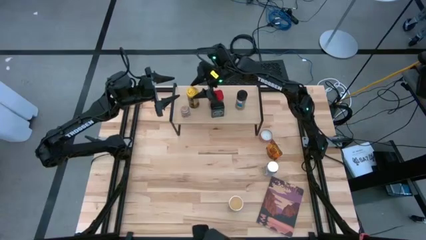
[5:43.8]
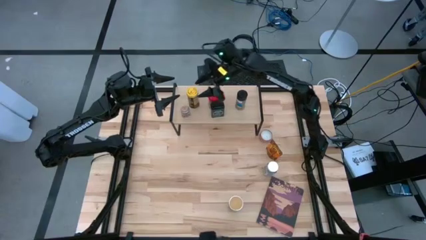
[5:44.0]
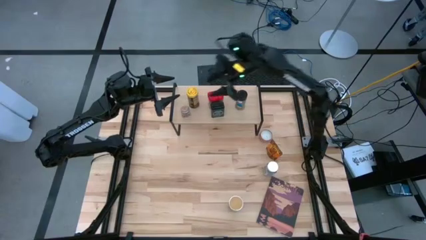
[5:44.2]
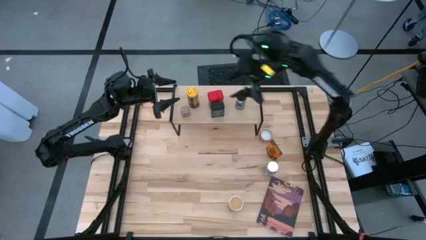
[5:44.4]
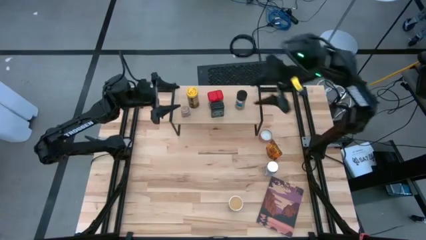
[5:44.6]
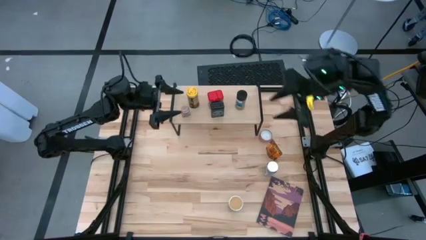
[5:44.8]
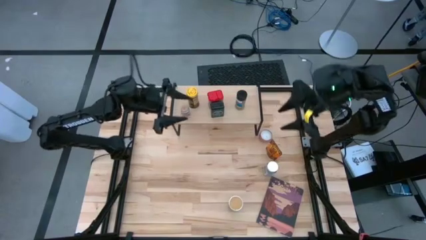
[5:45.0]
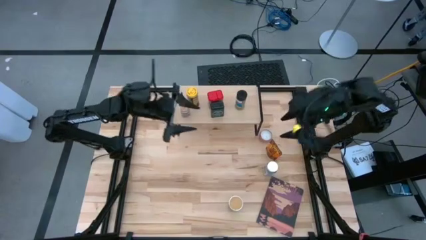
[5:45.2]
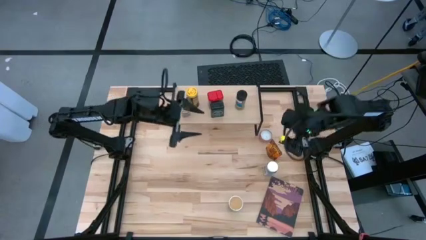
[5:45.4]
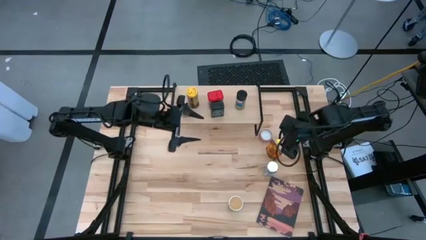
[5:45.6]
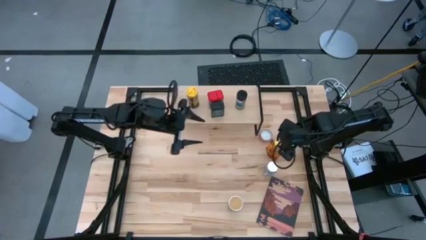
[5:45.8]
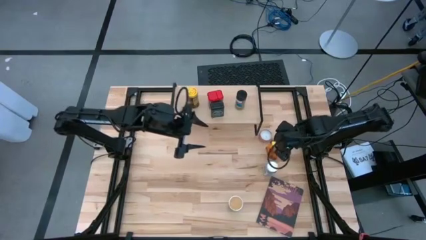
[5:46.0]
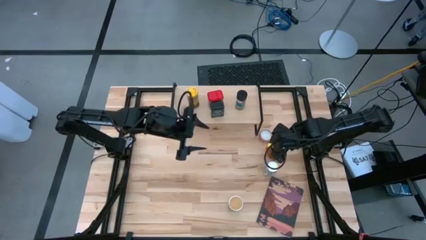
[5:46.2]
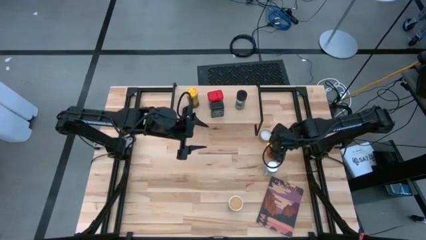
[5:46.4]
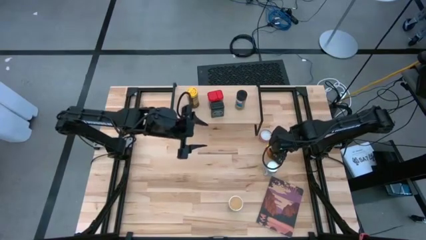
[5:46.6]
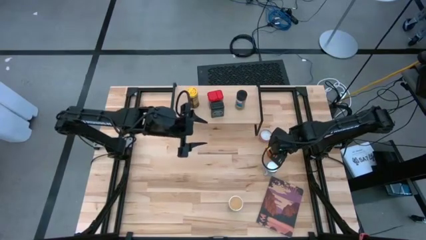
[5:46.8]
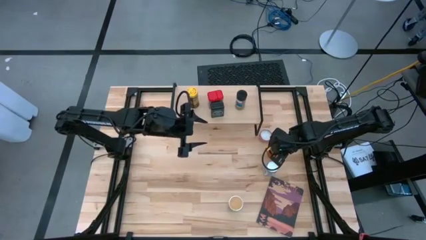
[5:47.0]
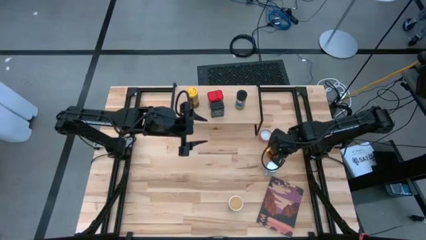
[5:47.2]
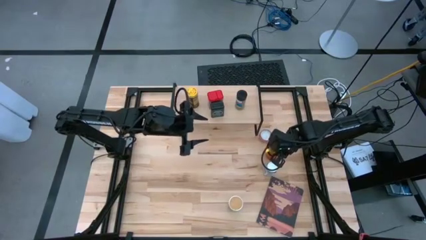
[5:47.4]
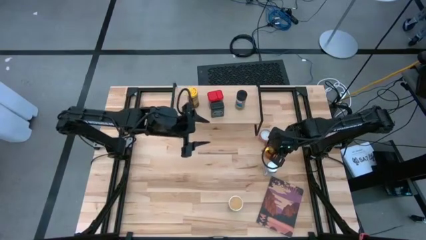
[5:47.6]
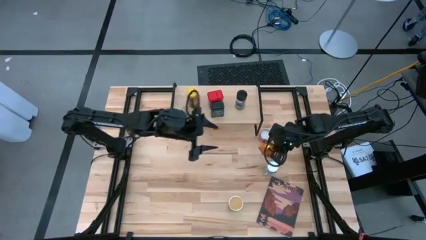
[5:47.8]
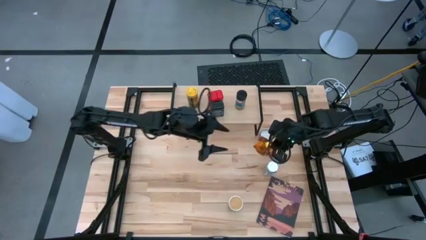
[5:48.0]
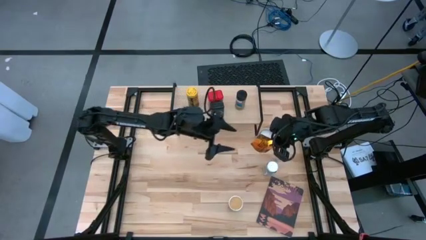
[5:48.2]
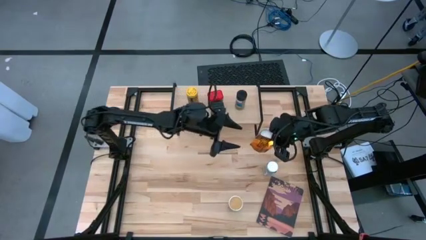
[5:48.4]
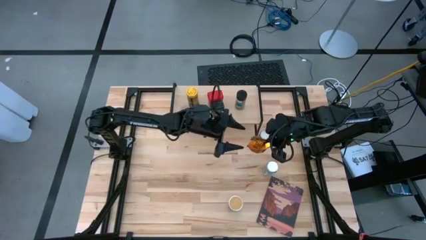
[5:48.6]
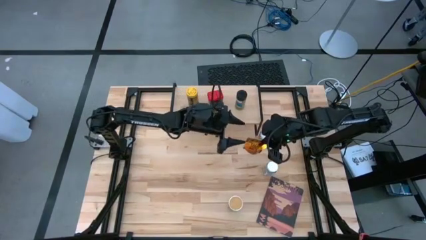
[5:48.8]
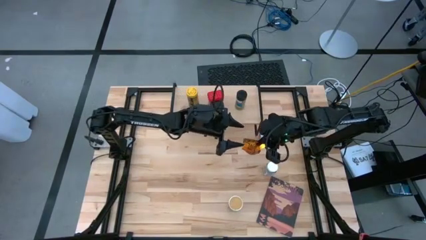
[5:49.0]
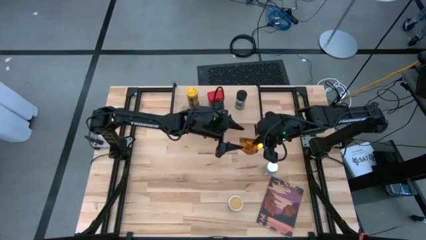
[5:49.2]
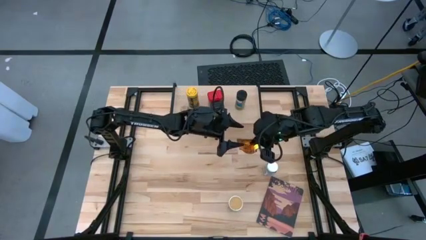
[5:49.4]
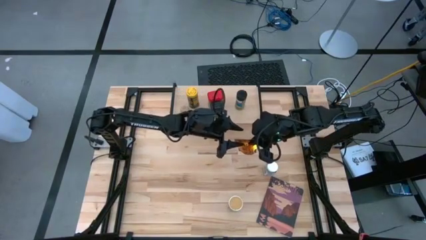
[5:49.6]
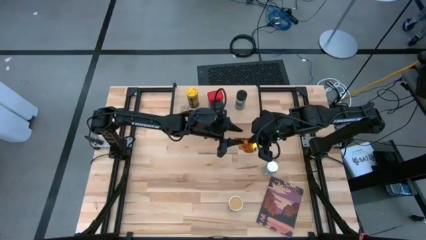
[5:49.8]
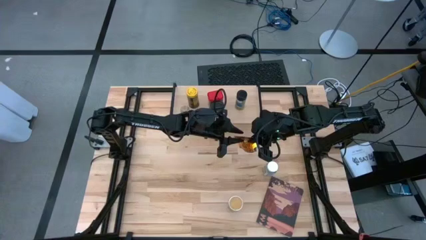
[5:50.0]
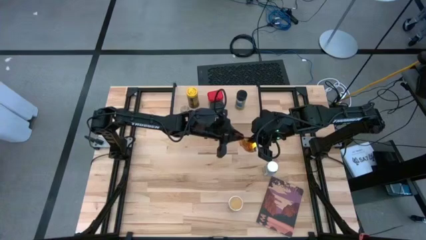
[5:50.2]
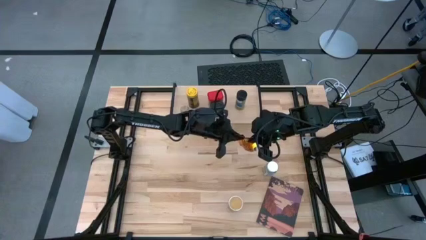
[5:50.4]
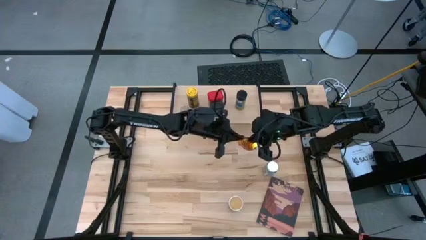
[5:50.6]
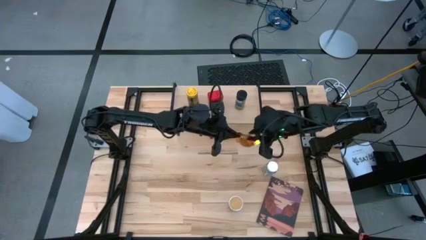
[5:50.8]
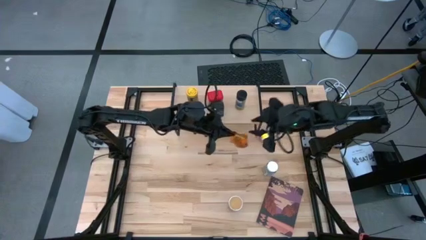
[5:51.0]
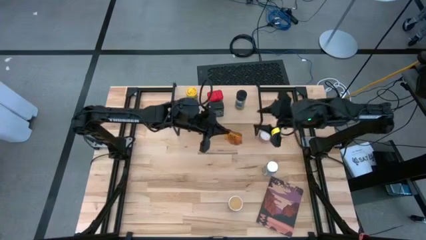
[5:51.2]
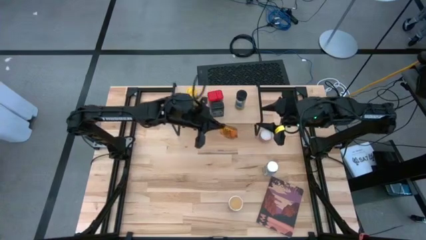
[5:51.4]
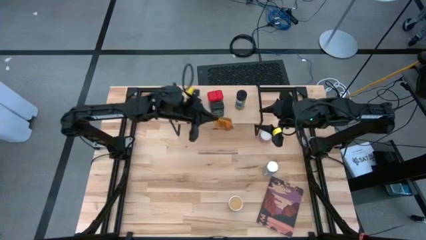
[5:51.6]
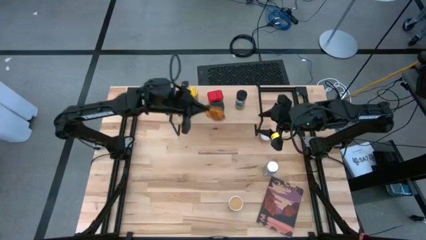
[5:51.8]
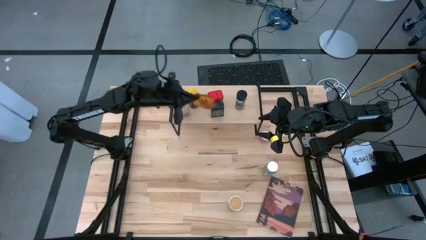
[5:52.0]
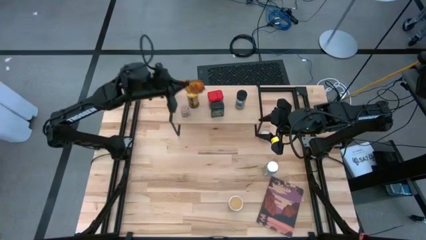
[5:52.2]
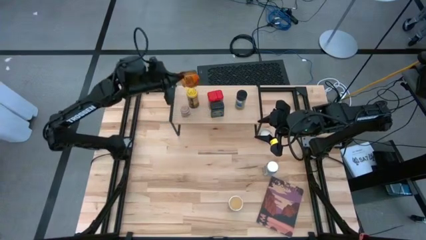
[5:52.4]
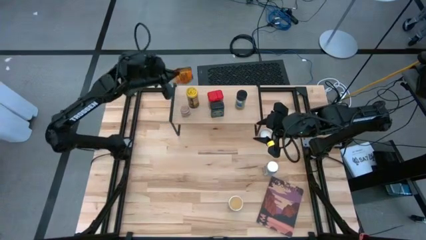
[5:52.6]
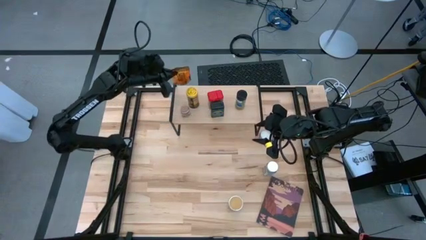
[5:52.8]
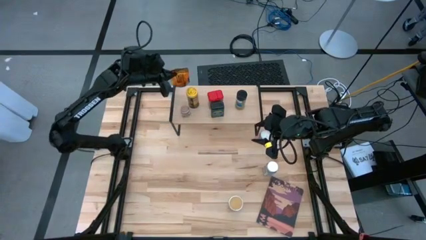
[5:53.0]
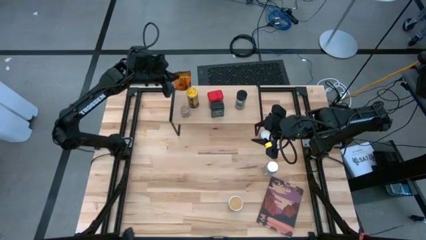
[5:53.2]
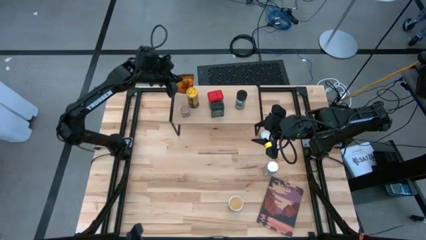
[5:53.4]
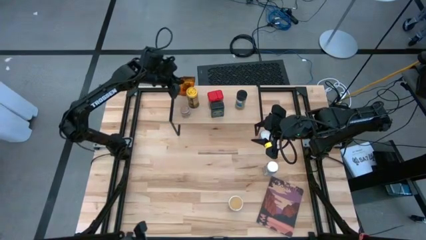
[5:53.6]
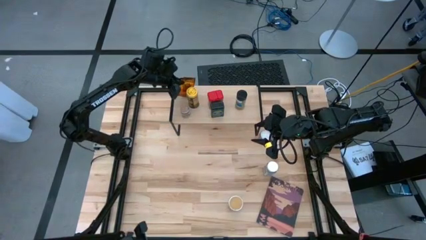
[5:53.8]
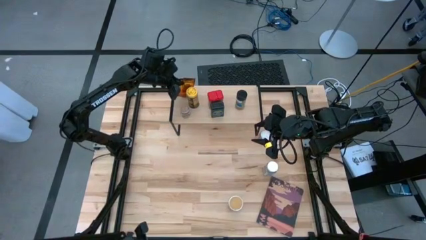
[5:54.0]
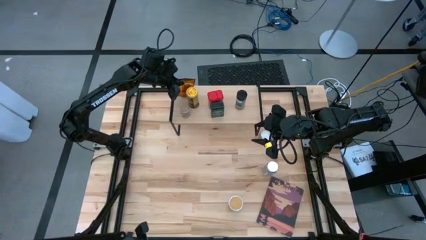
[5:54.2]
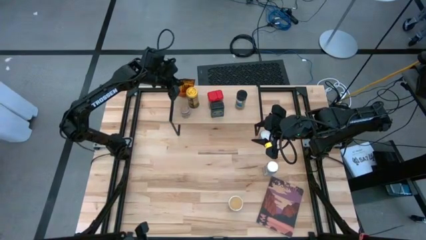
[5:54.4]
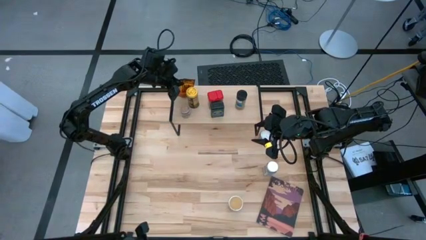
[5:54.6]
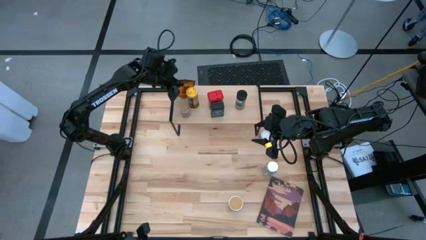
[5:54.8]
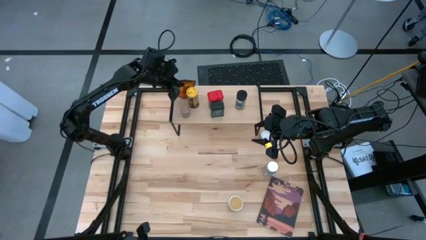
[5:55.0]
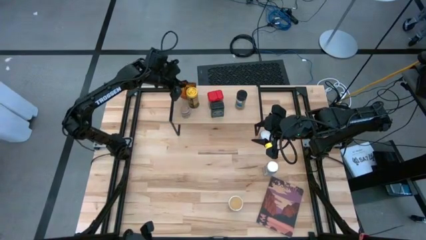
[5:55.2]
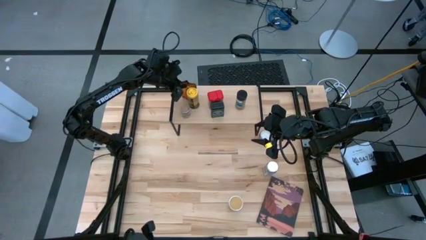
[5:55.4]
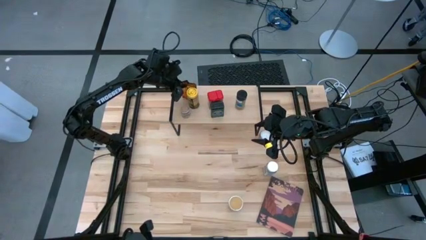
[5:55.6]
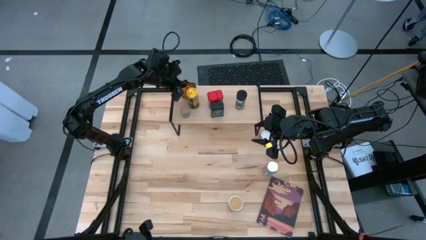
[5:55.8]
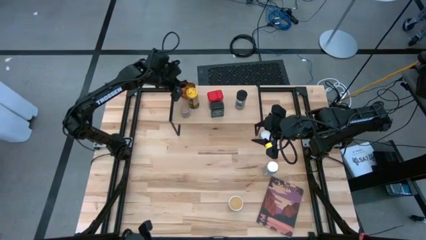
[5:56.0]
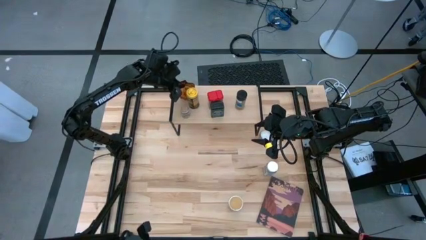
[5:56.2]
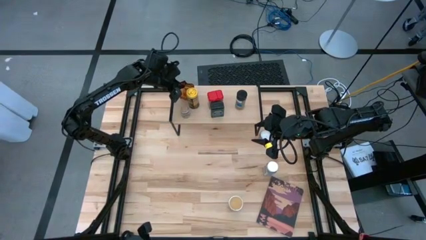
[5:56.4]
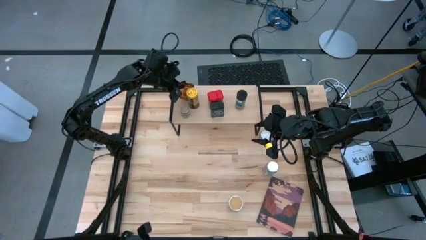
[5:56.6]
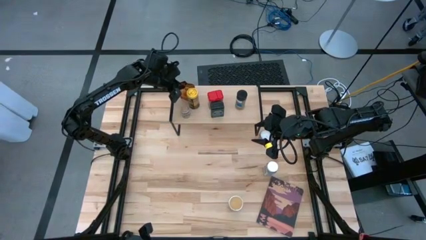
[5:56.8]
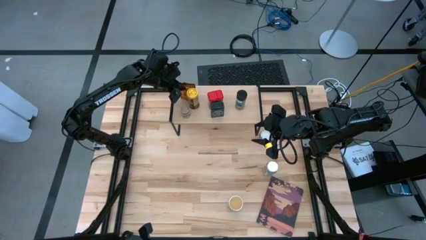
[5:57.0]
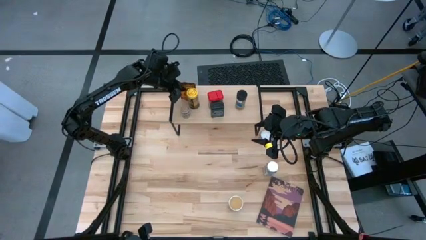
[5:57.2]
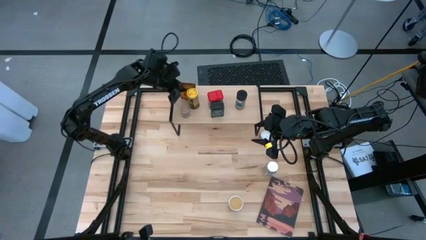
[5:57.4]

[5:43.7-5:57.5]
Task: Shelf spices
Put the orange seasoning packet on the shelf

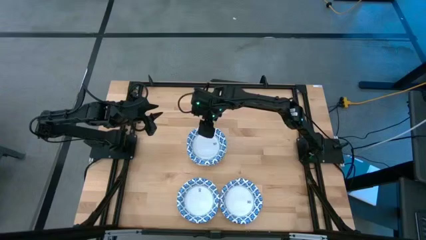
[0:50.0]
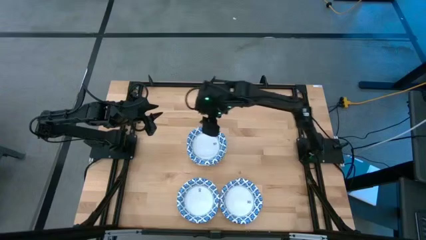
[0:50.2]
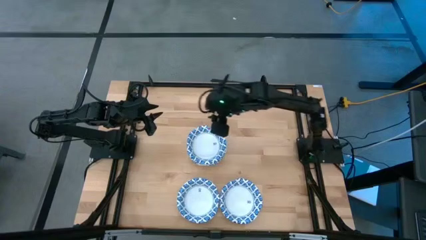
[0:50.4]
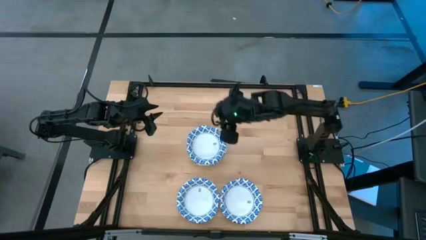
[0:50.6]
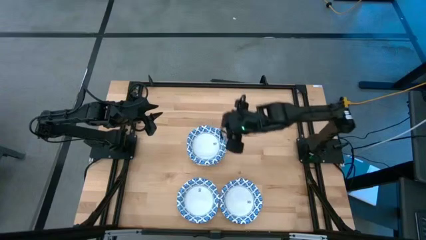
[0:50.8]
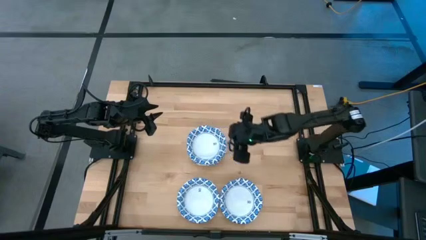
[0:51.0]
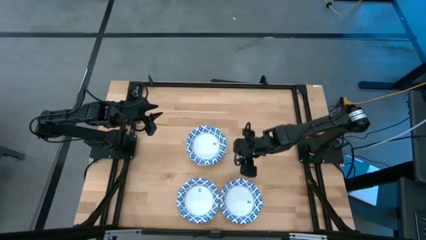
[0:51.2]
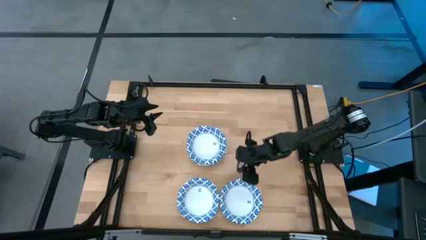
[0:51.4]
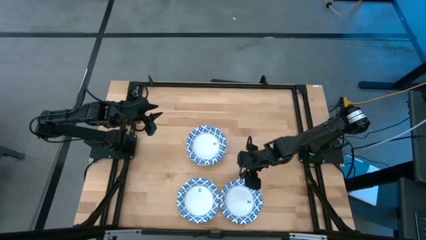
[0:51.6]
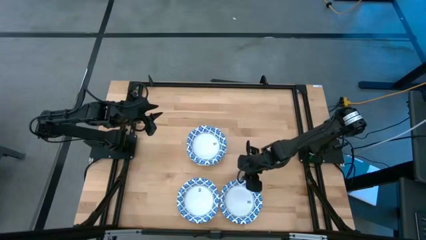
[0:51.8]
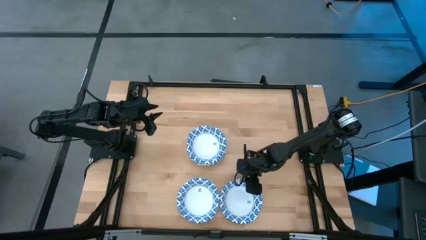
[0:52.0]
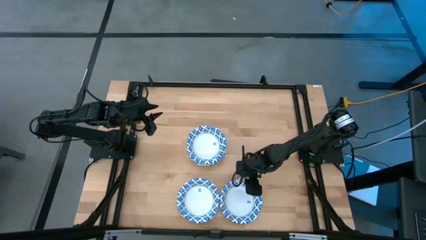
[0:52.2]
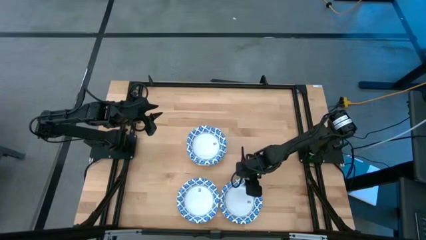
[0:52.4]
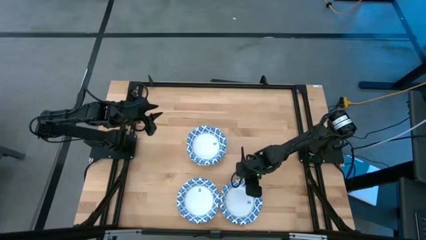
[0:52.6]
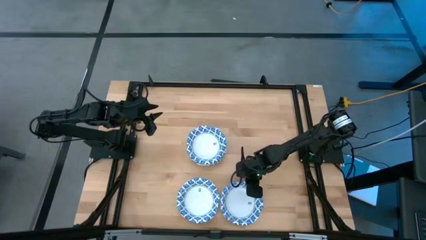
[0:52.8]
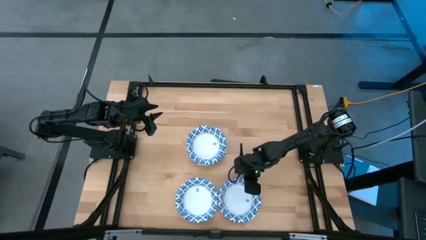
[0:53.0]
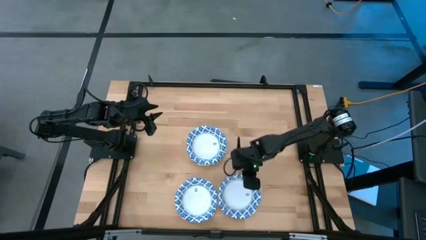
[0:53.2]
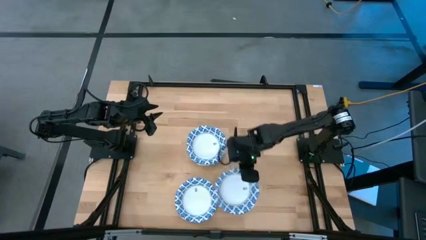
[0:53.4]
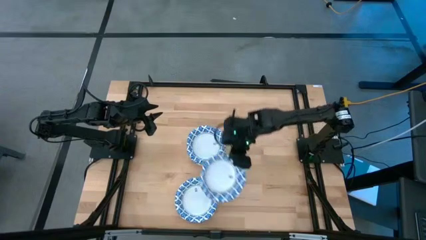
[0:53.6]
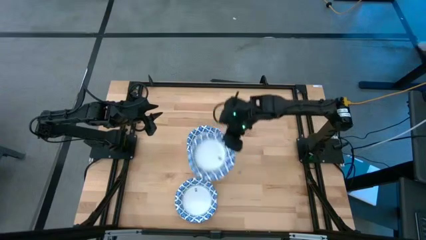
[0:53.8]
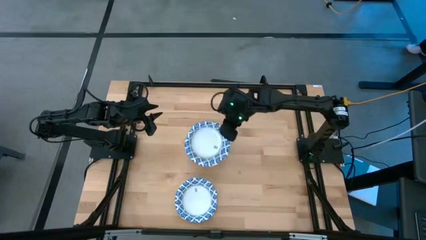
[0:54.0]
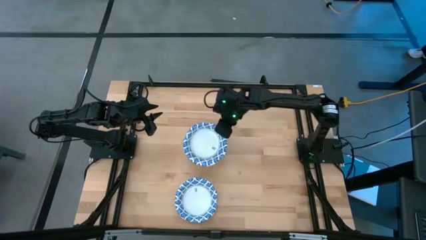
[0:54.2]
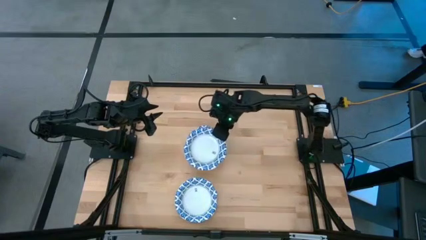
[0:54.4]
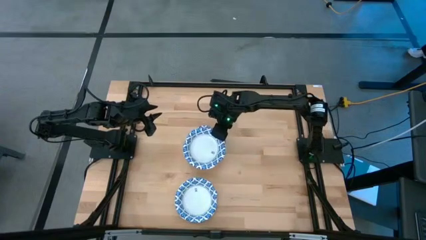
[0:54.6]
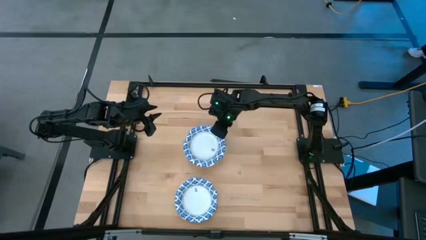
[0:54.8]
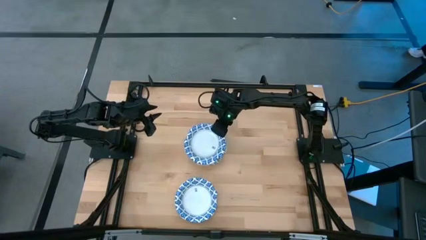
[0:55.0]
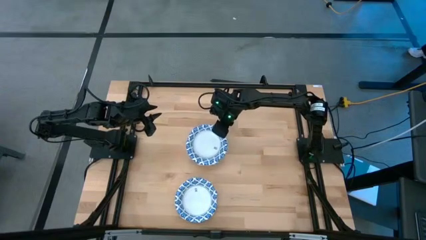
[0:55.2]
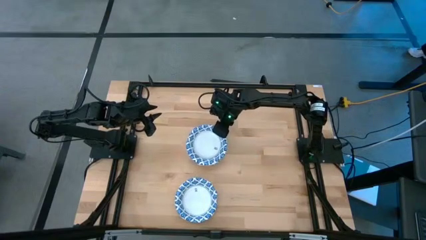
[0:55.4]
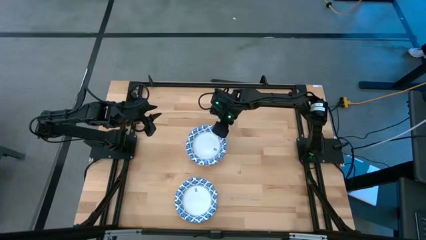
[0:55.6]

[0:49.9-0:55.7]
Task: Nest bowls inside each other
Stack the white bowl on the white bowl
